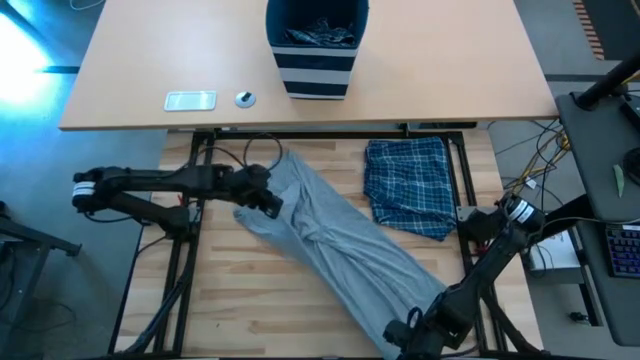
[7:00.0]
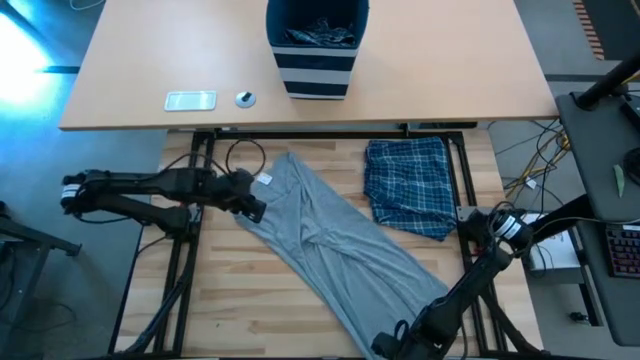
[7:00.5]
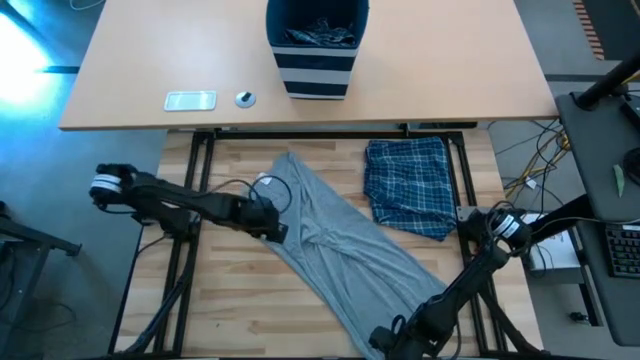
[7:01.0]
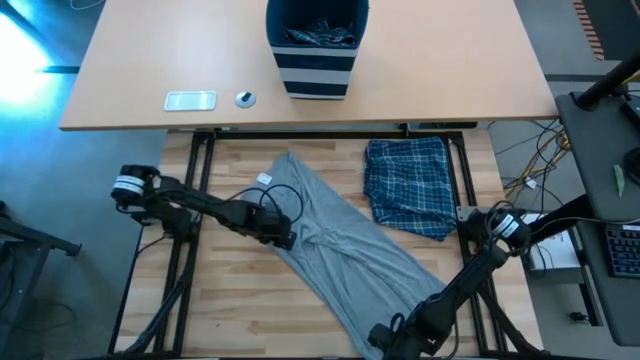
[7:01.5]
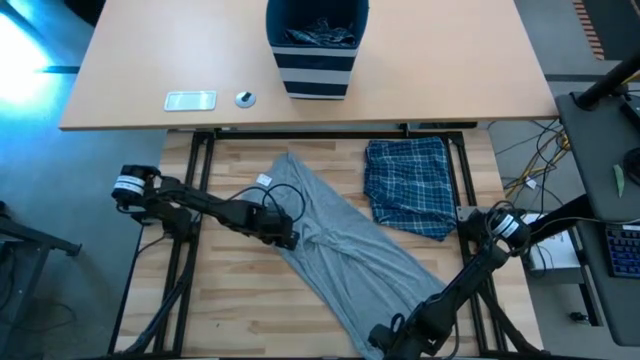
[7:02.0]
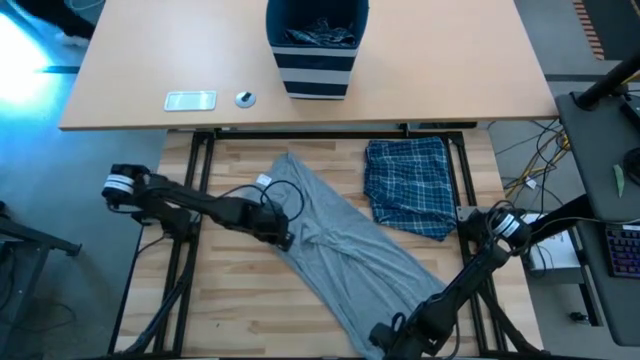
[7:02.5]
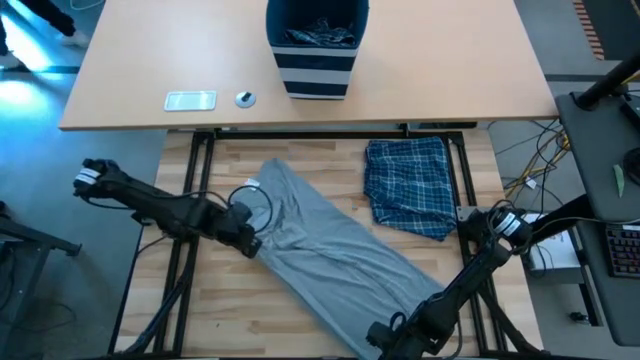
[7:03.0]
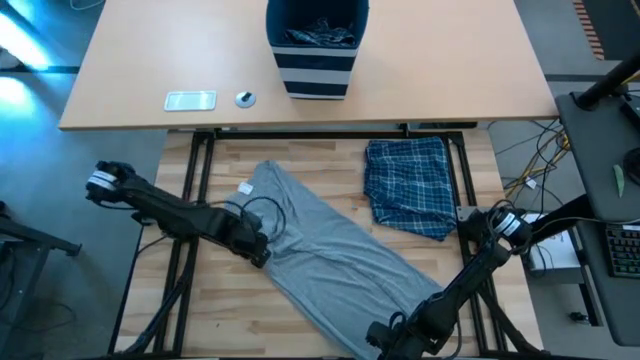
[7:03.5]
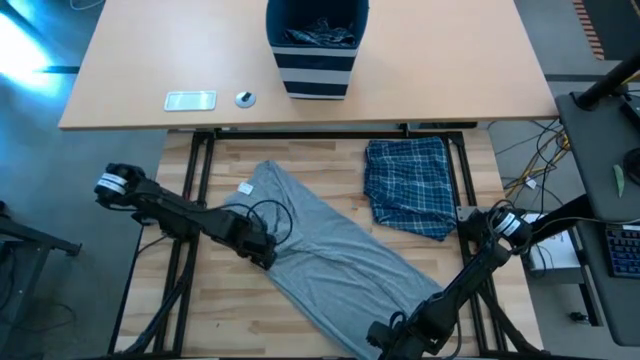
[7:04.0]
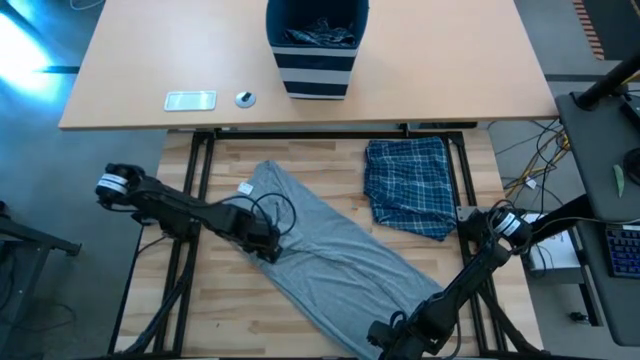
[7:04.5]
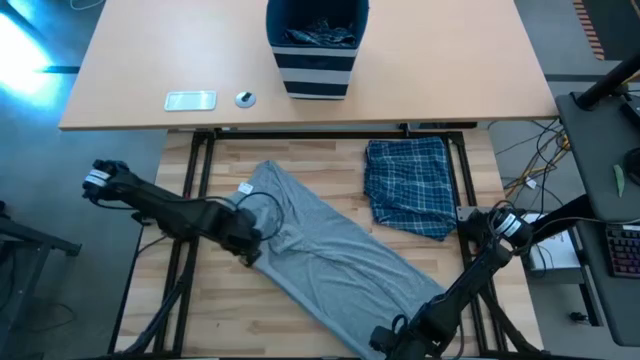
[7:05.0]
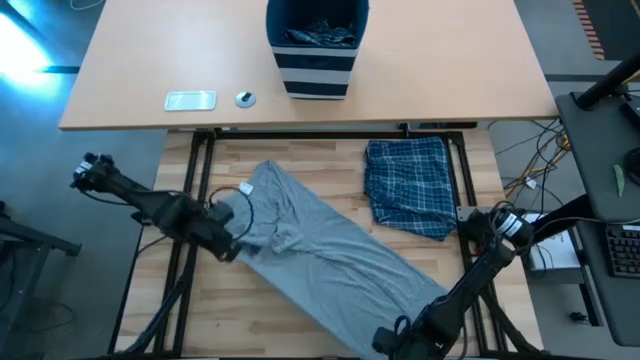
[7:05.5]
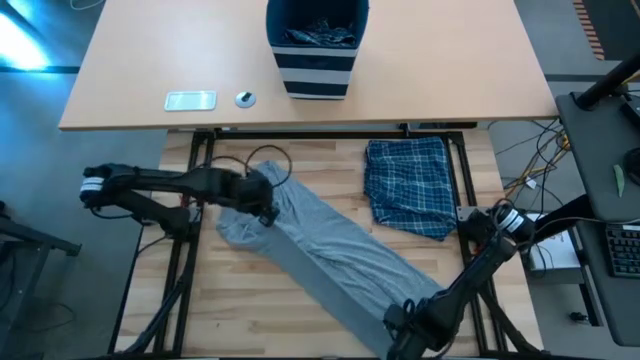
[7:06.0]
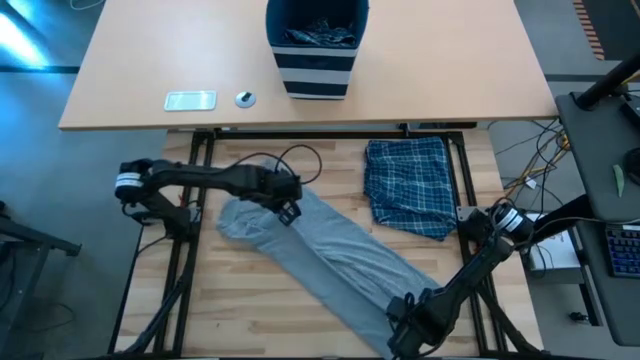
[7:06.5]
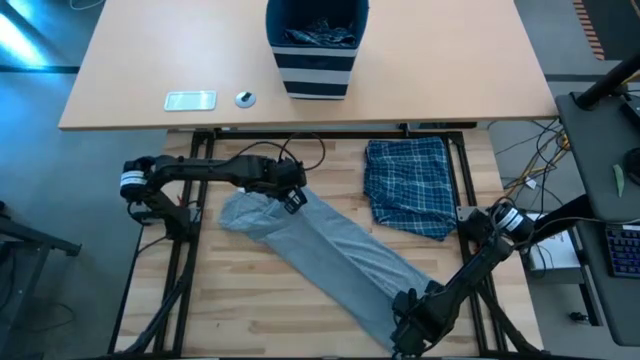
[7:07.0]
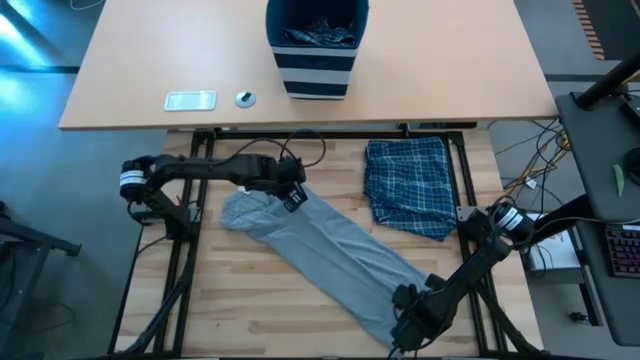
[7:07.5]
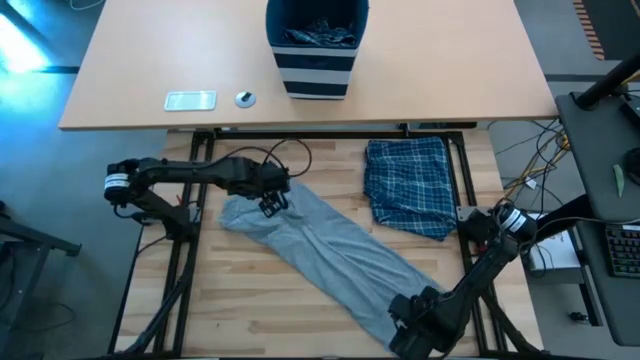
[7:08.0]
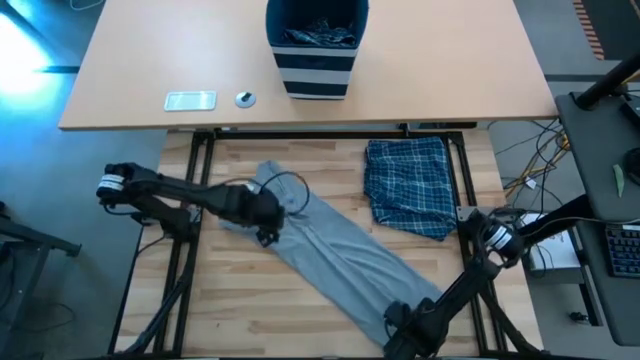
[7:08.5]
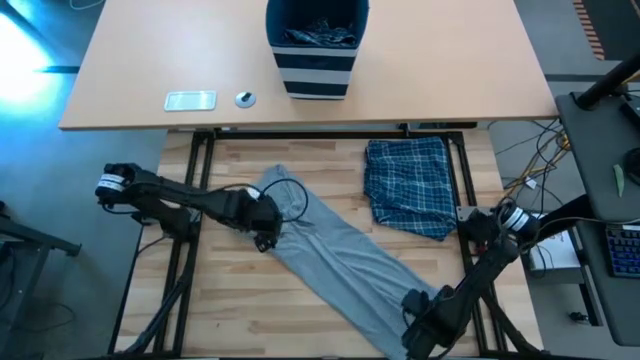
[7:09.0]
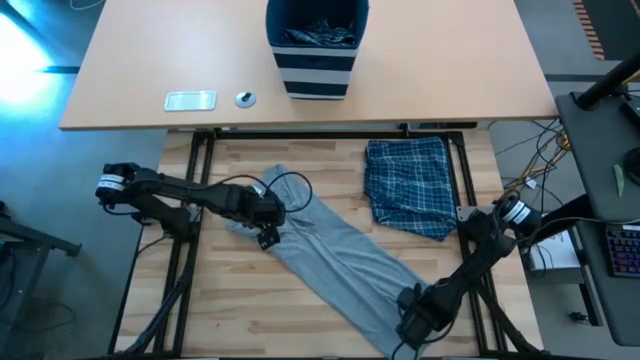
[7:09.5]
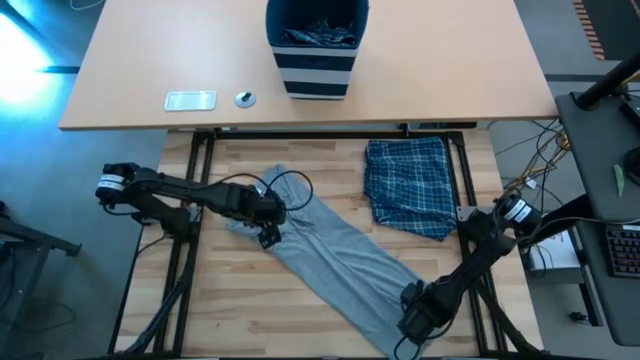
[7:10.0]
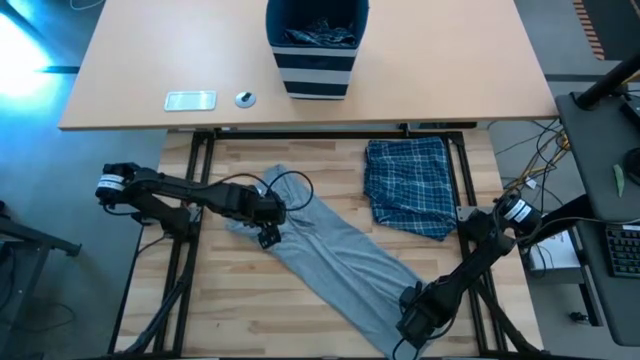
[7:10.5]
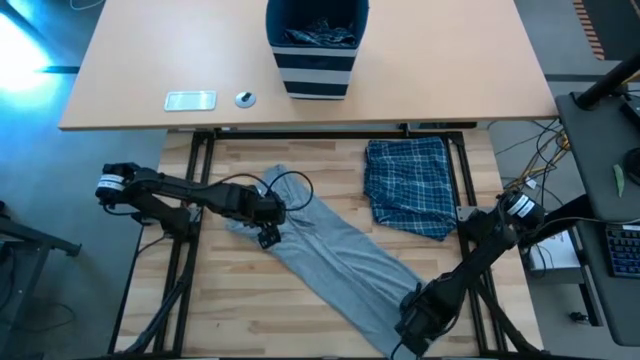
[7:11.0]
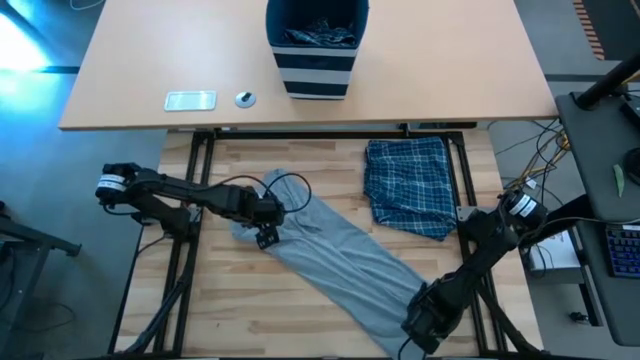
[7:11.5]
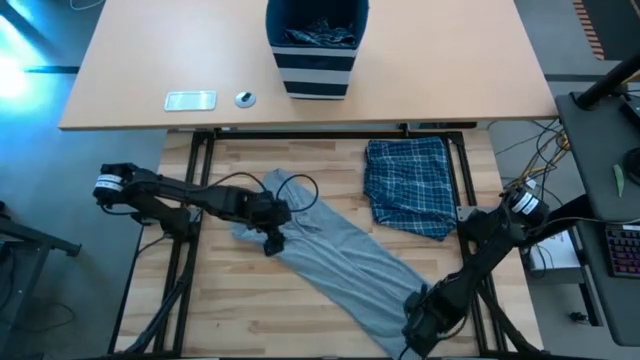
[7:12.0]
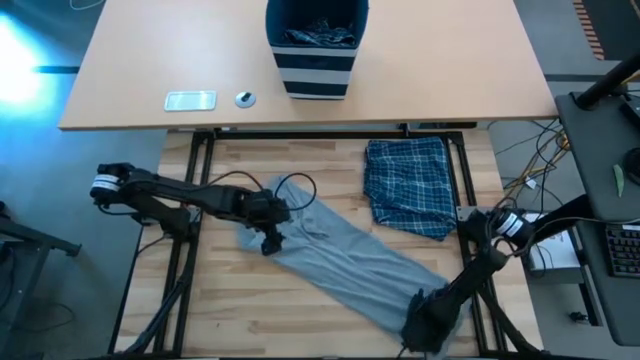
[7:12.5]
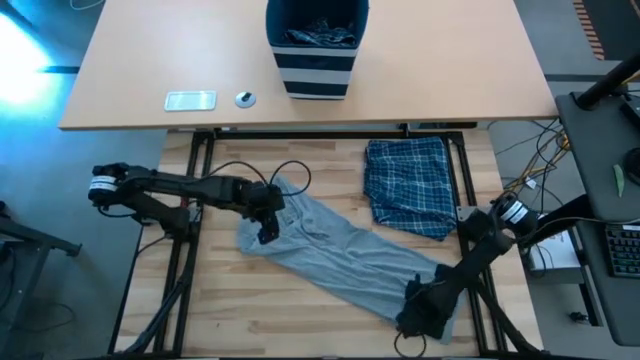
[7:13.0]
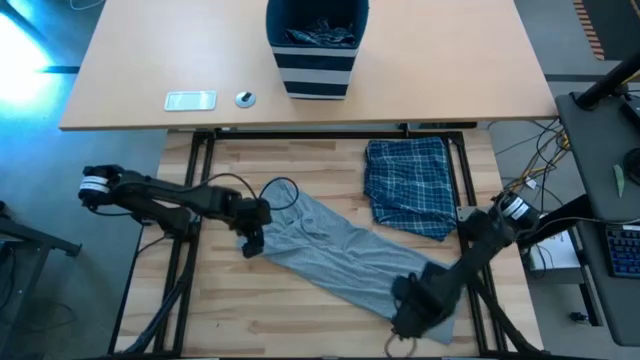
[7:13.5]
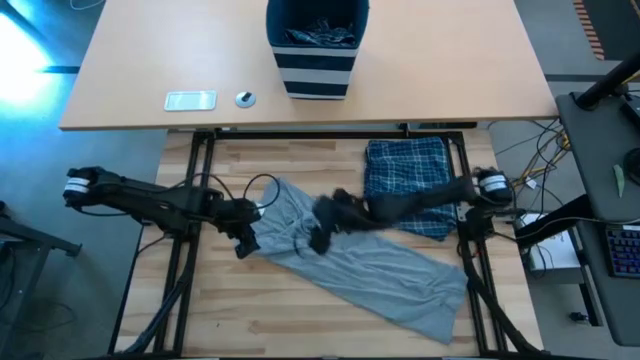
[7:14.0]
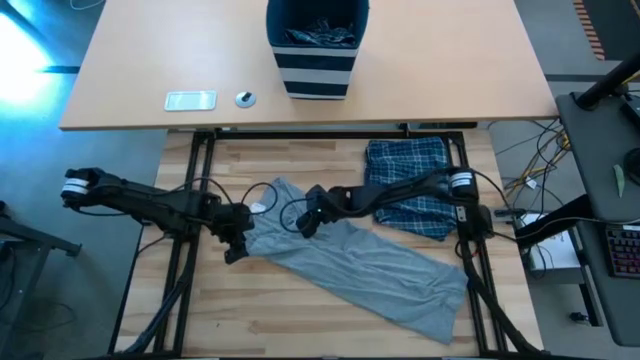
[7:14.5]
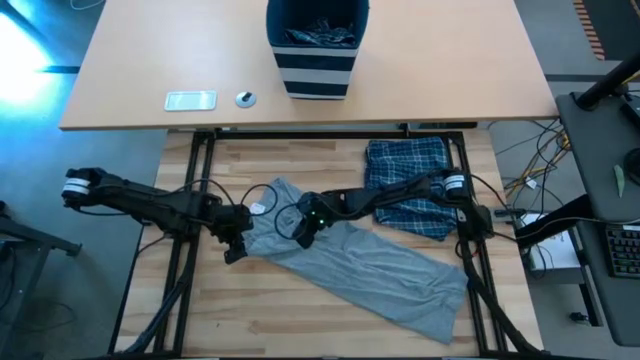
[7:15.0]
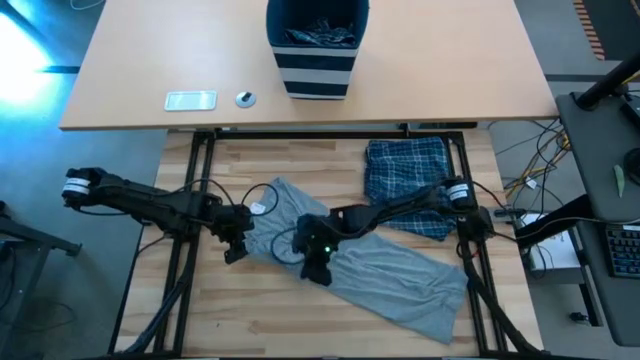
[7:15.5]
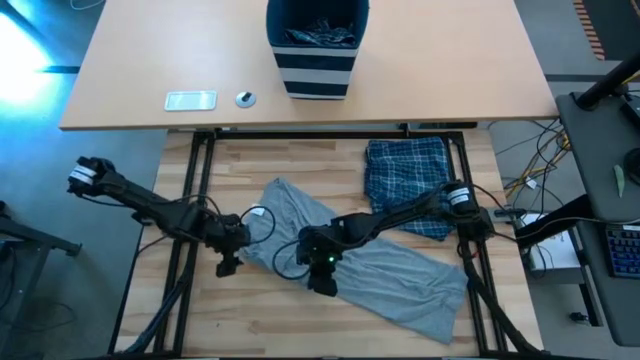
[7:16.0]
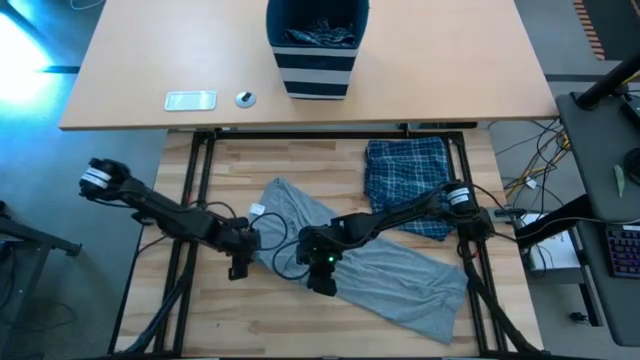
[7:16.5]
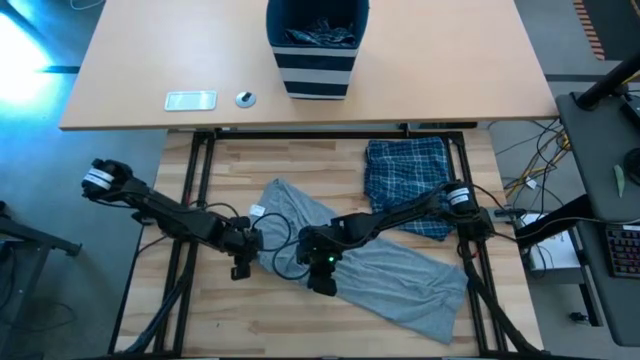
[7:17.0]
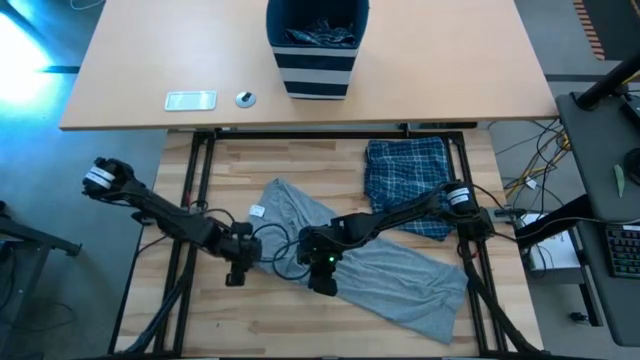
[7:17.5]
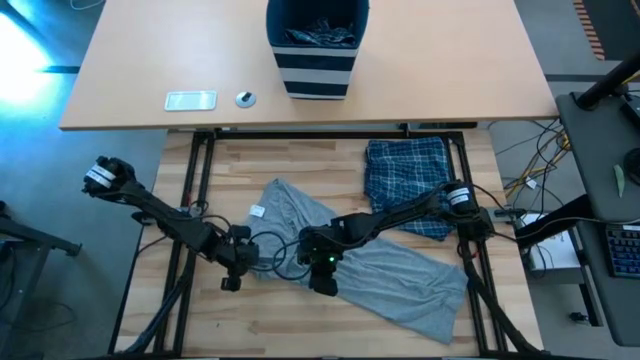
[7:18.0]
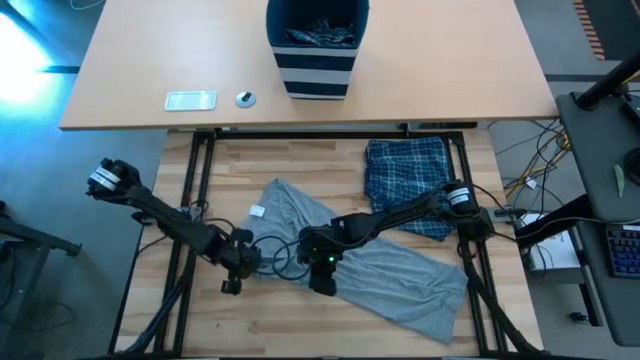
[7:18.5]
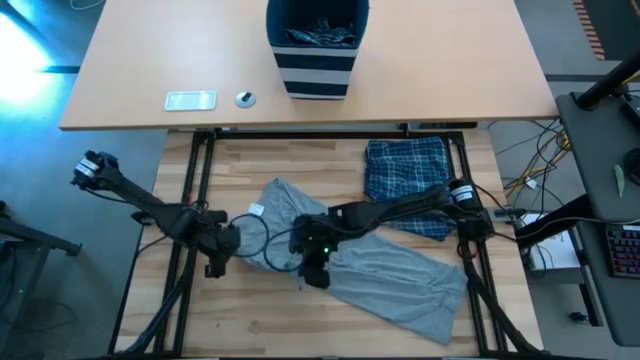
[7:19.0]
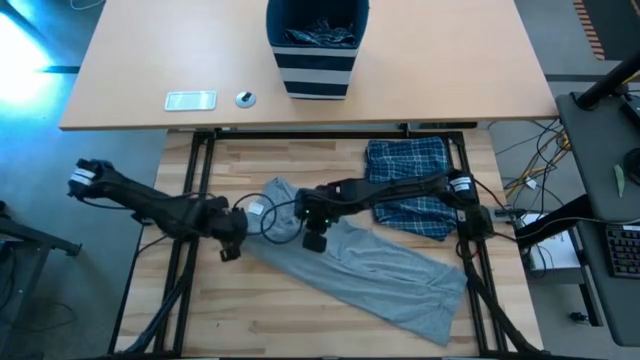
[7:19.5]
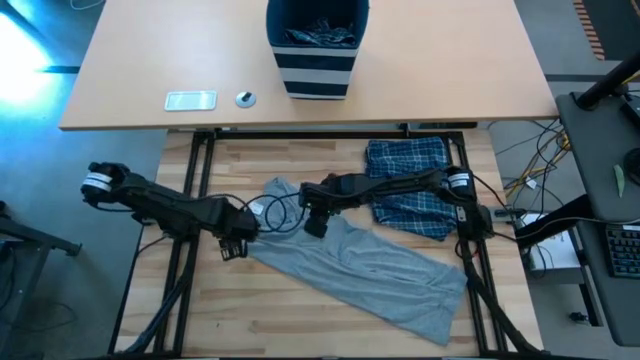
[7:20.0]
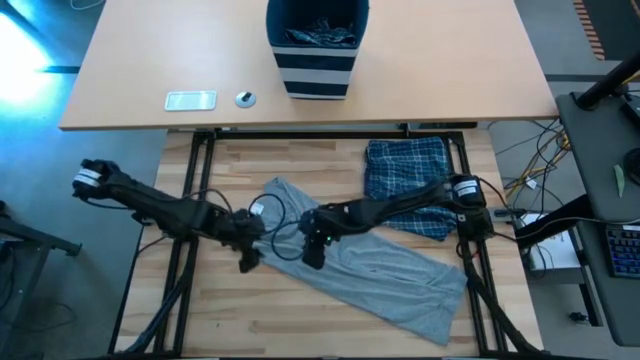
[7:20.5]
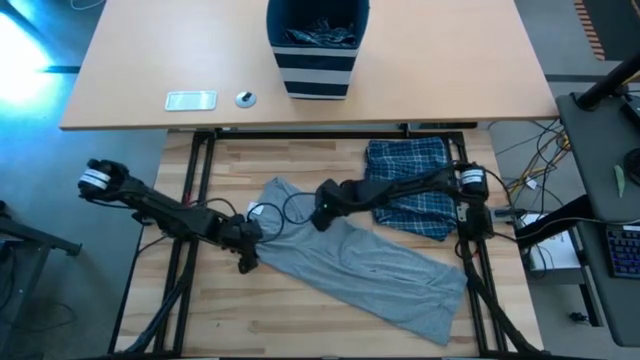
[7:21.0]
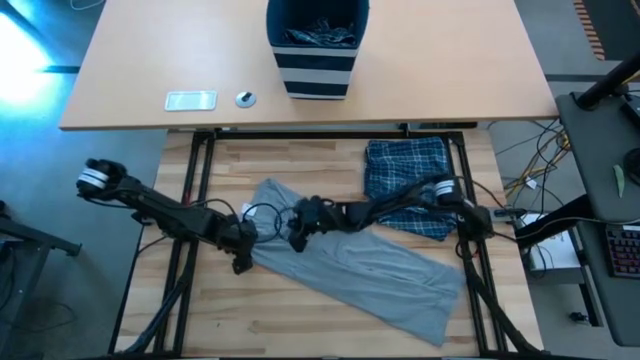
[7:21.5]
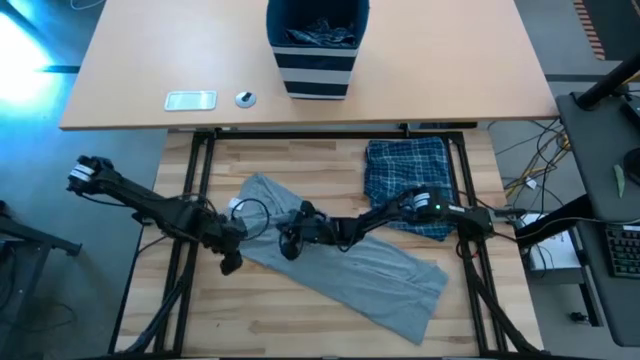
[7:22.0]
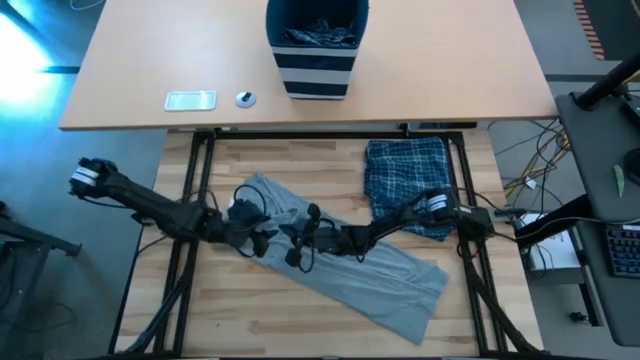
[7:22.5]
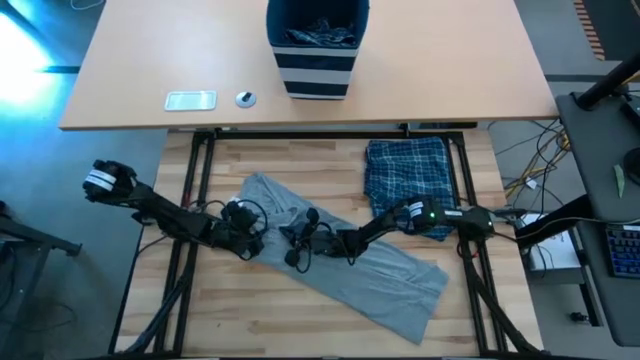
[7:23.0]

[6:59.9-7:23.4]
Task: Fold Laundry from Bin
Fold the gray shirt
